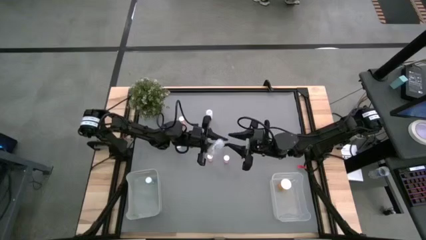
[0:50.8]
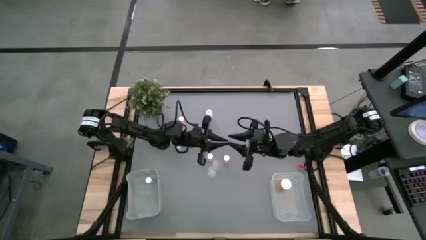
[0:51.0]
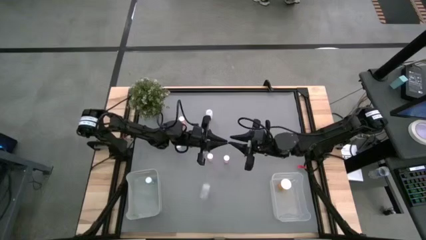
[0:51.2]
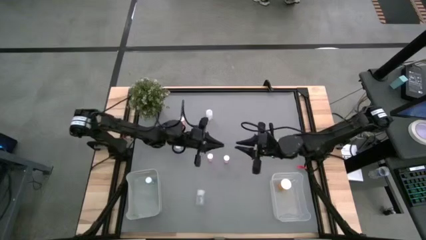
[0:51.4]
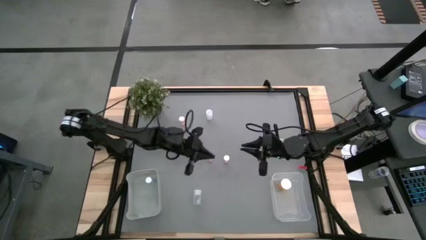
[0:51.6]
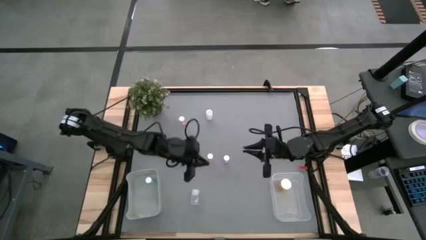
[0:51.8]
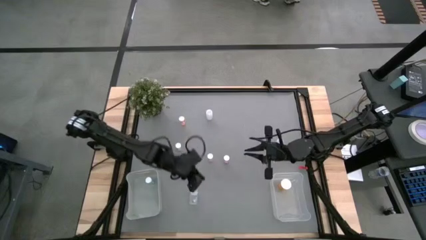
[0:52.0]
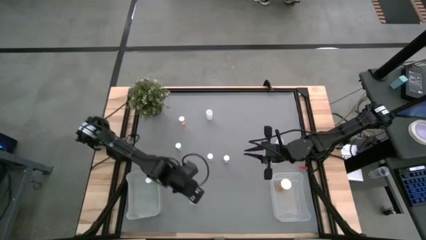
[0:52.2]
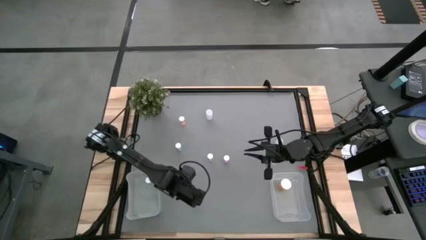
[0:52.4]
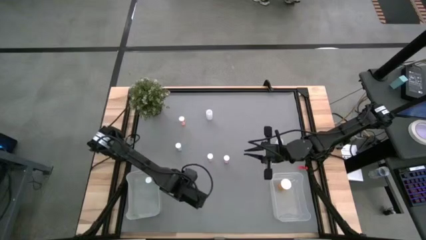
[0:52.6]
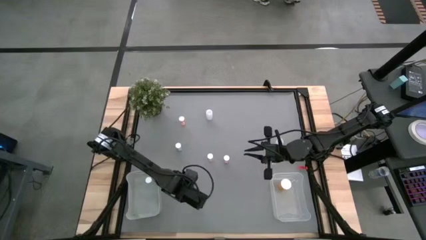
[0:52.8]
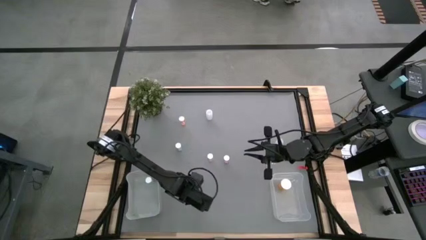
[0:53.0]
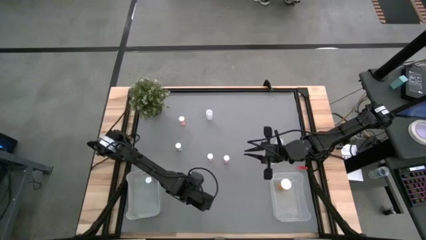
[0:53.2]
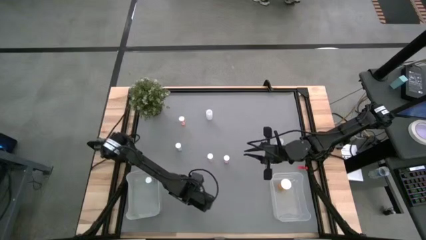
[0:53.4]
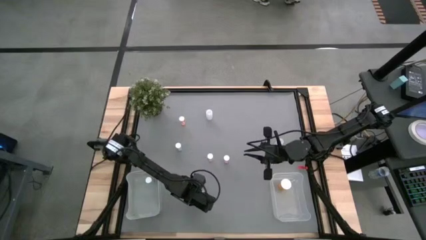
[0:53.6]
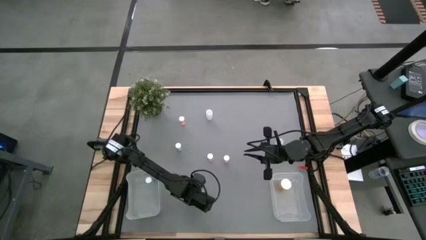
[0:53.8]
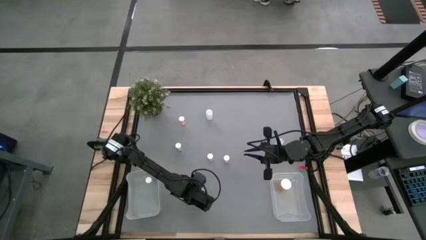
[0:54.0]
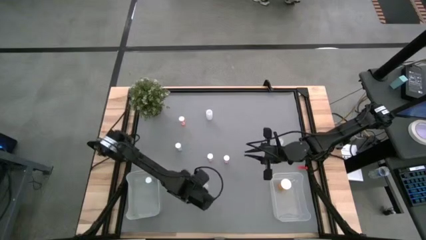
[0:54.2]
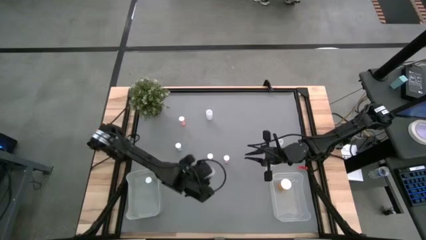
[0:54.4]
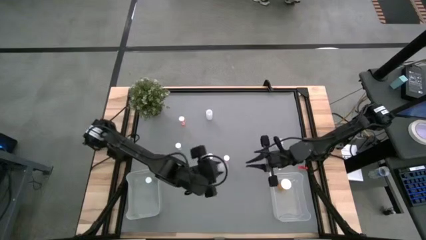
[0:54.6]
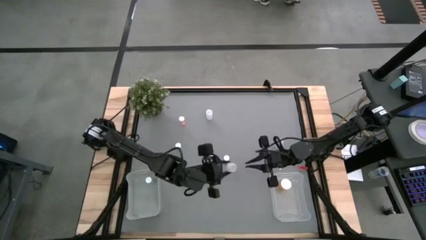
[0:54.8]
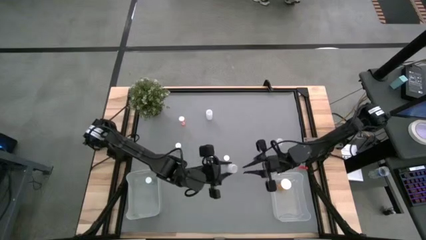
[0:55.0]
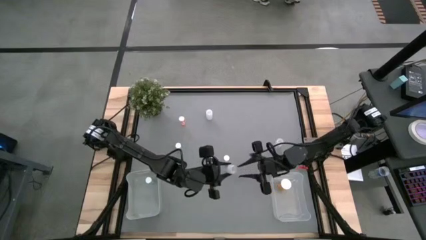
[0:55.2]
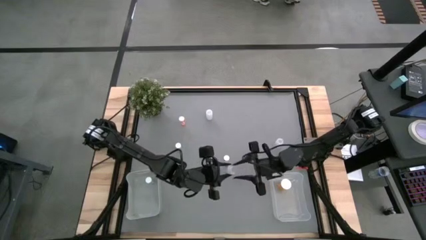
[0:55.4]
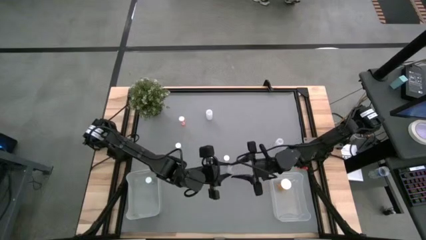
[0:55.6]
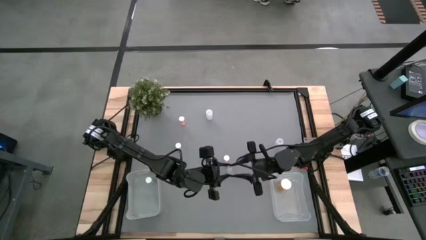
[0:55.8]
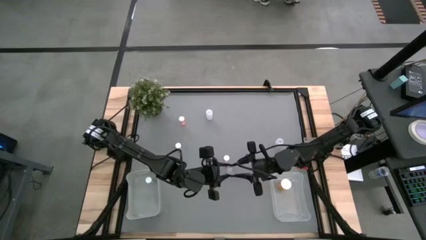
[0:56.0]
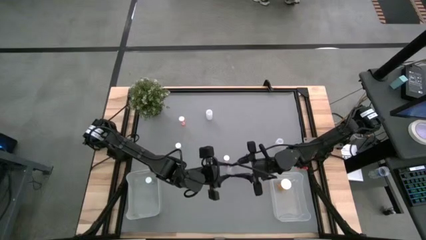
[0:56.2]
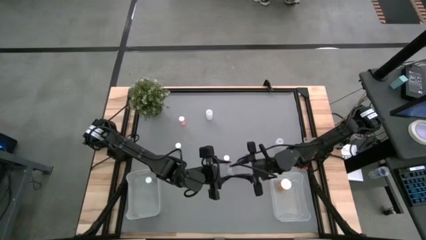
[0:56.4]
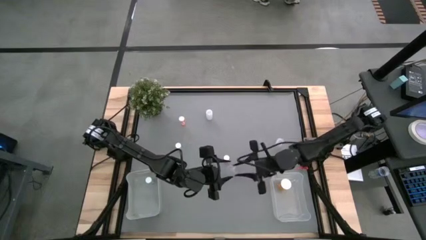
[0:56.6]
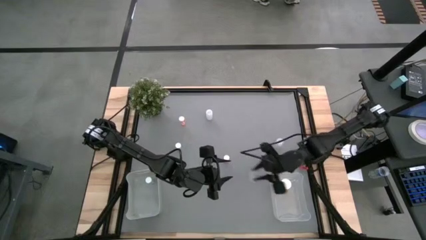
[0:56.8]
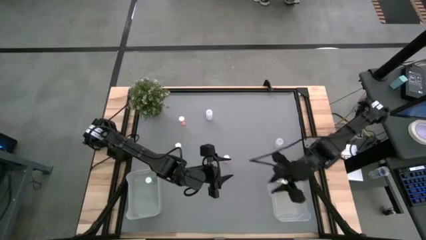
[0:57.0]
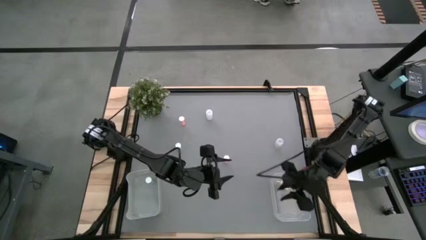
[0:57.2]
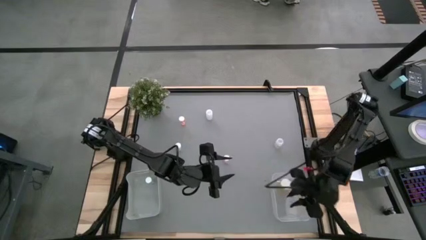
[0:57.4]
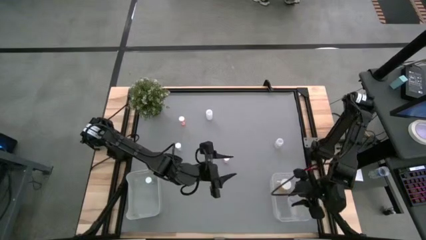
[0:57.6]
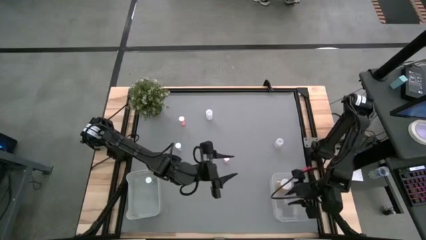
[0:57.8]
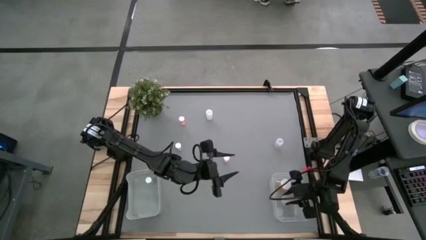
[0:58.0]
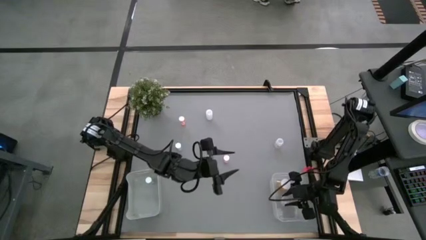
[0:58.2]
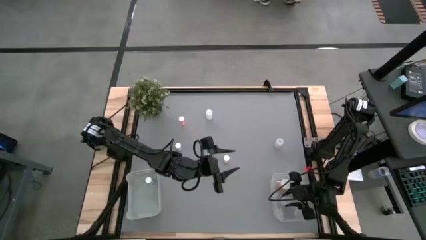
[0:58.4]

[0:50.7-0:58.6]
Task: Pick and place medicine bottles into bin by pill shape (circle, oval)
Put the left transparent capsule bottle into the transparent bin

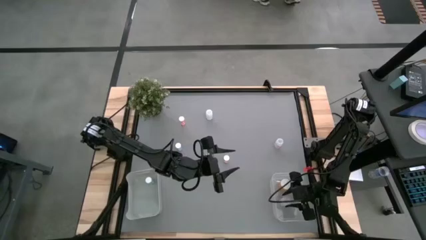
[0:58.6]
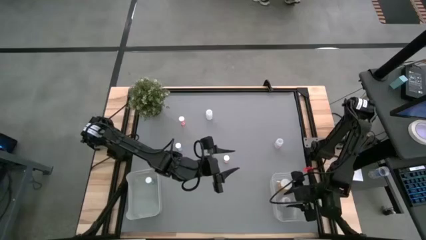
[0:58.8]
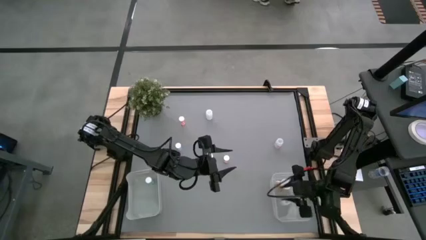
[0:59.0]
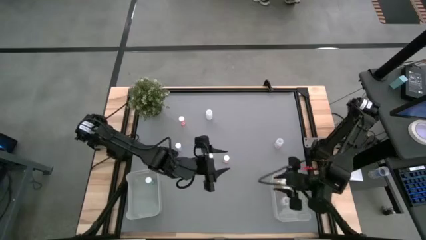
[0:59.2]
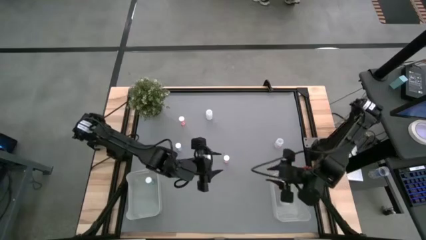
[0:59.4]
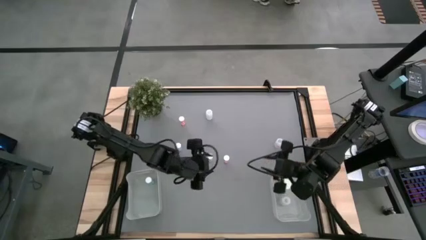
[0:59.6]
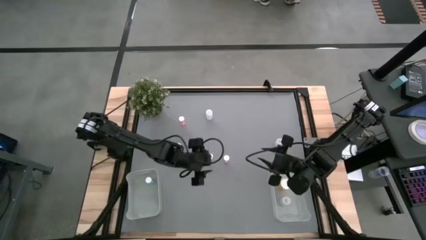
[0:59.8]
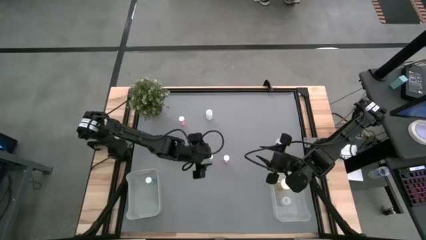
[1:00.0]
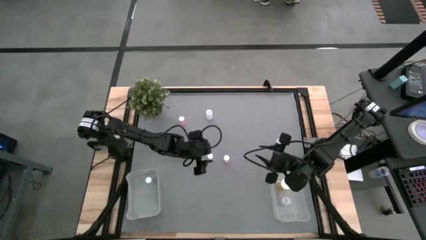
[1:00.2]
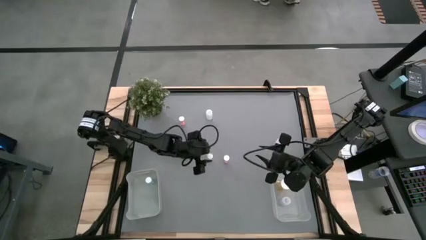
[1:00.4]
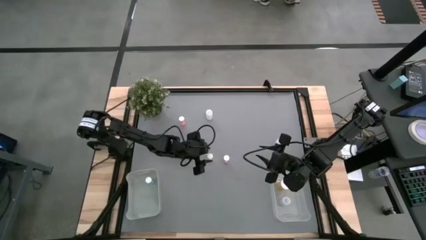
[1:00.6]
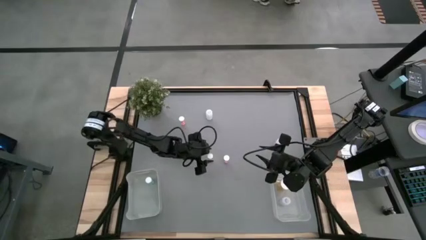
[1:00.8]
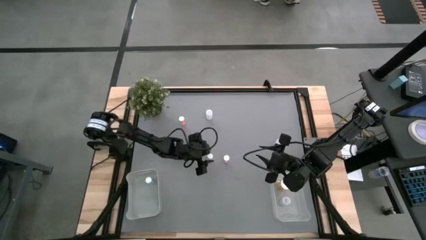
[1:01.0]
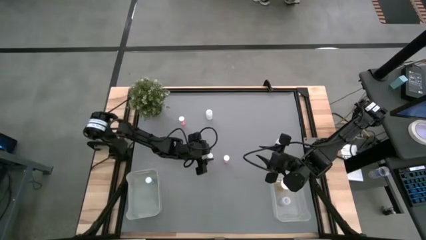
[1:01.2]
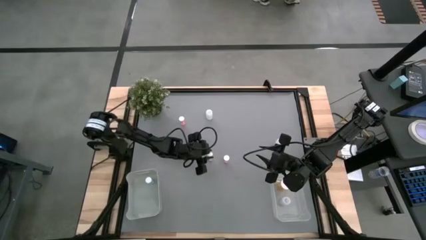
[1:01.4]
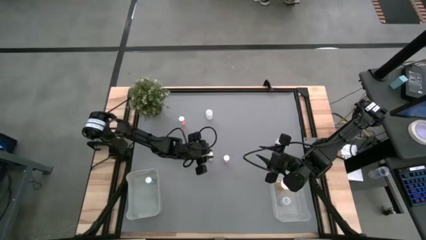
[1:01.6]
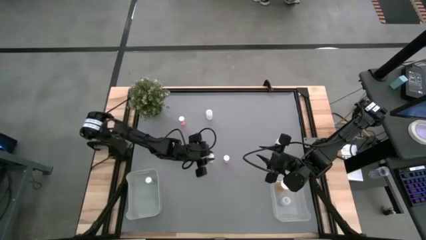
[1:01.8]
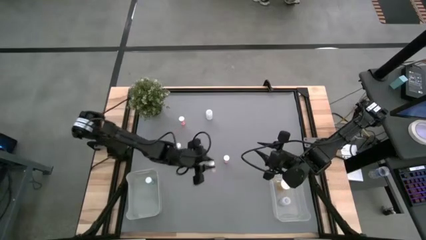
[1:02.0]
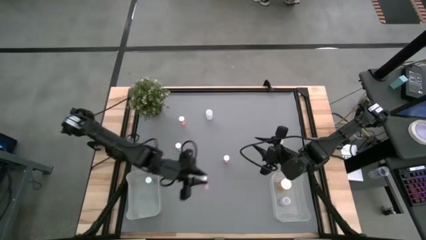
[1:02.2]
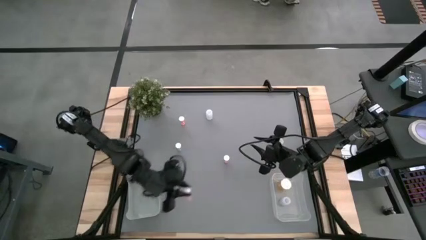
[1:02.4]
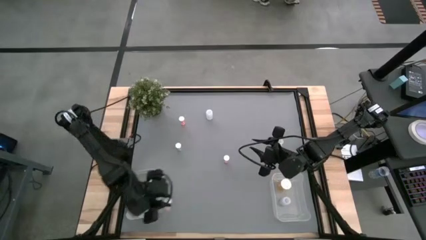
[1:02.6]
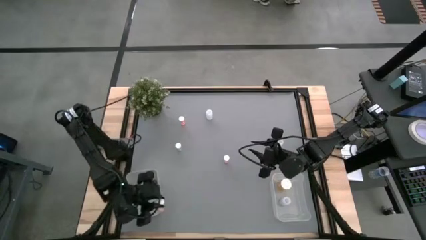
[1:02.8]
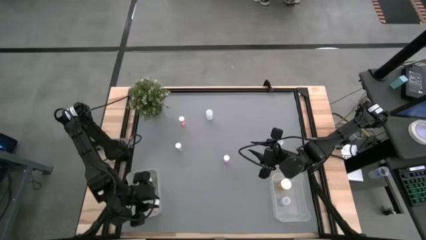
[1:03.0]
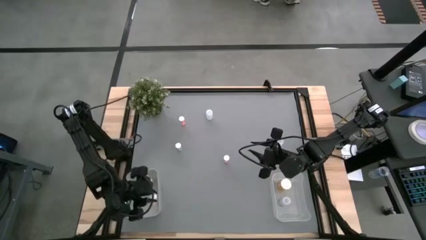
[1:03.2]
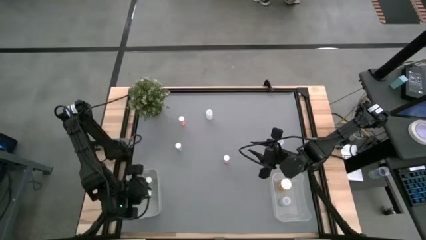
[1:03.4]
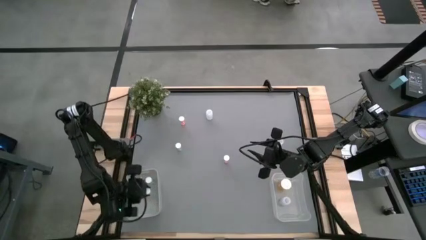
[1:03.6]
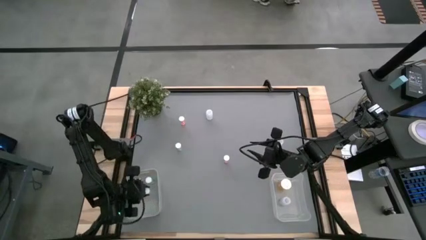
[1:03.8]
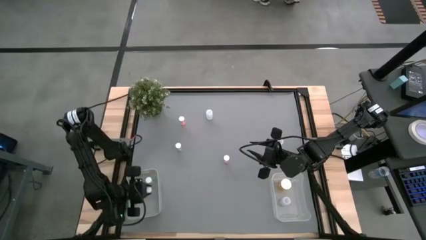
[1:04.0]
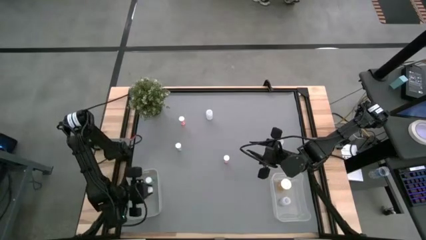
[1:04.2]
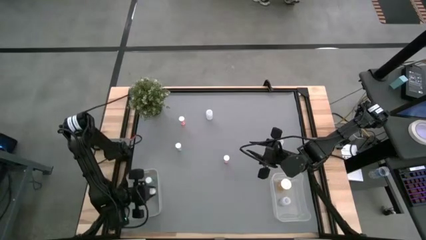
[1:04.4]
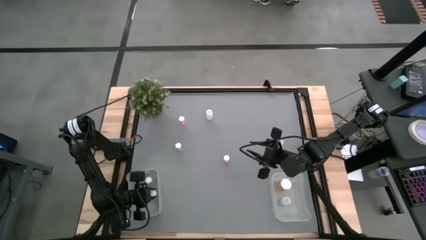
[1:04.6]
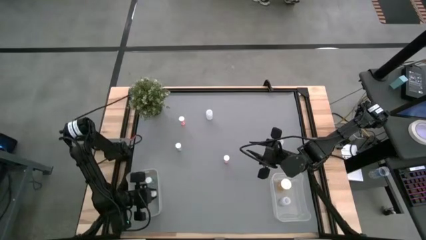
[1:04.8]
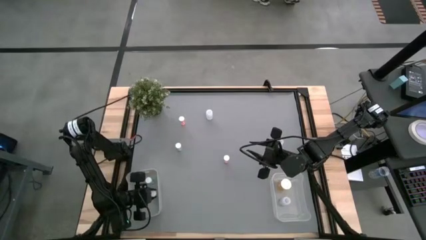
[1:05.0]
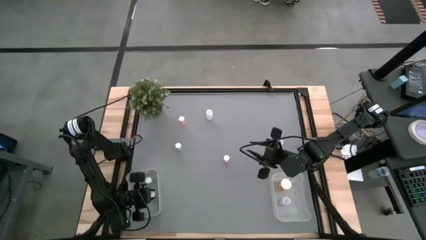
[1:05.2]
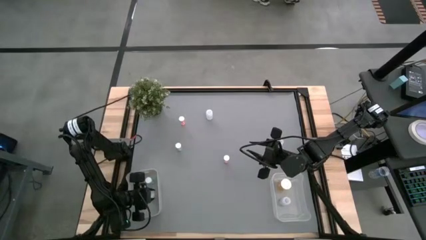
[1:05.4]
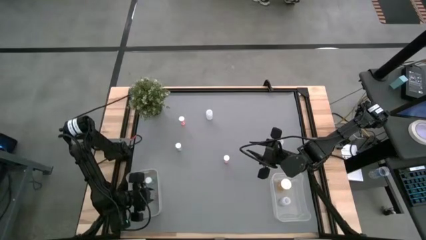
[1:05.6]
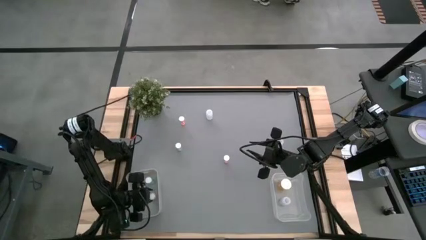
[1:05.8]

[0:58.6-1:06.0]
Put the left pink tablet bottle into the gray bin

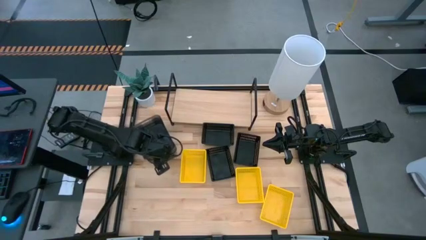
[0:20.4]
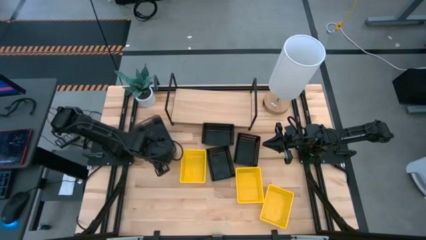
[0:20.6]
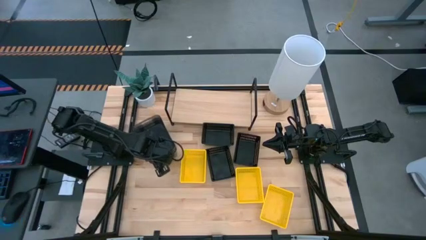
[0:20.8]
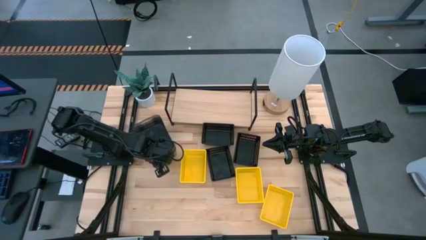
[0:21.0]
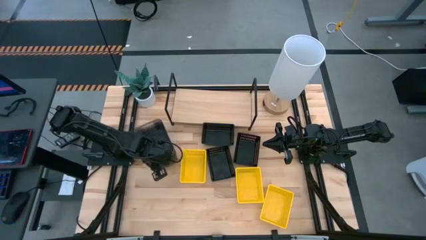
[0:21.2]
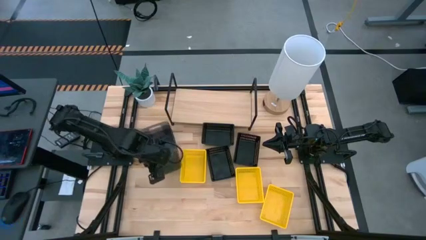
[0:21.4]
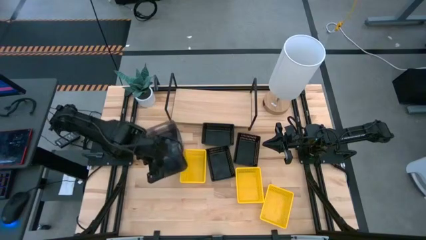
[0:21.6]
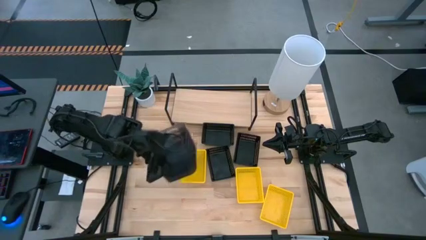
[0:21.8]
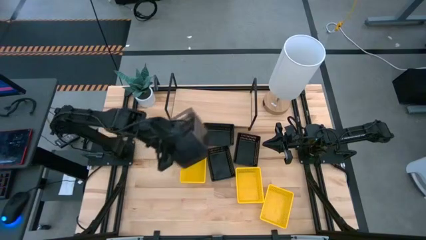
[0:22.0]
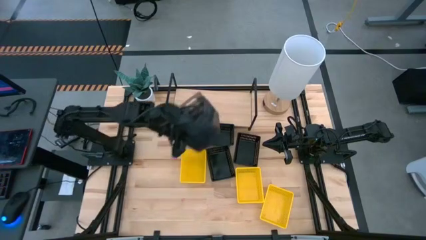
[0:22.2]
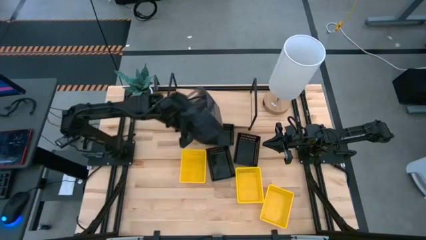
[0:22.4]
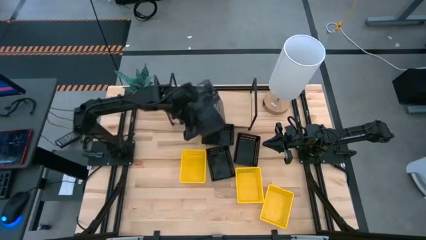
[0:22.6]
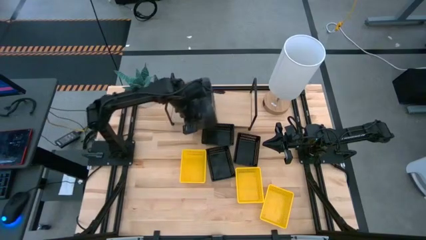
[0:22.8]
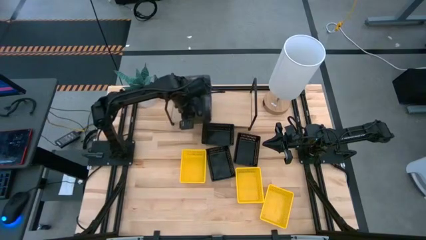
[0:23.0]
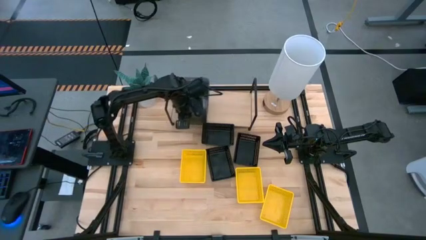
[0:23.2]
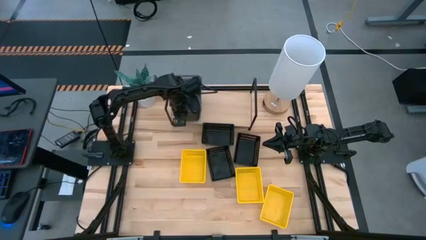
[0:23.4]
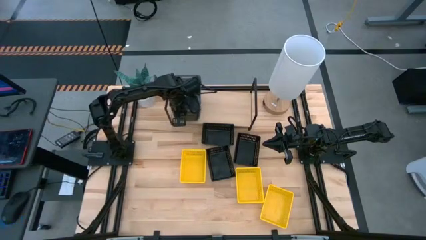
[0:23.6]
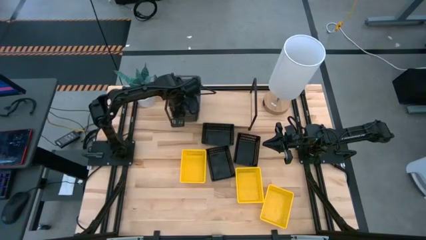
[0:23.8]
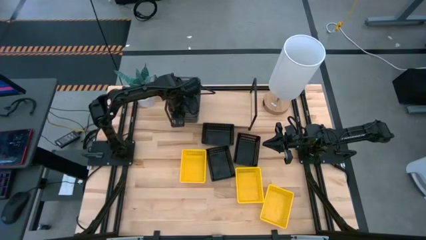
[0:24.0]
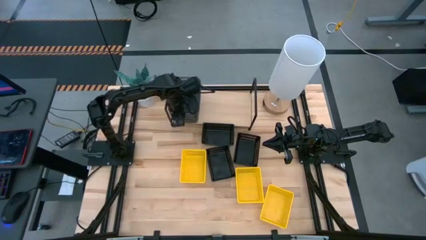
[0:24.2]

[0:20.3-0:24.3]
Task: Stack baskets on shelf by color
Put the stacked black bins on the shelf
